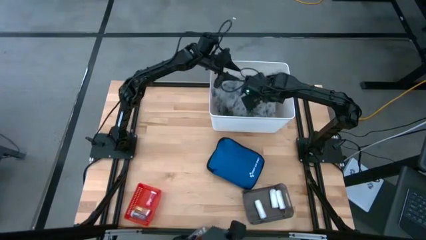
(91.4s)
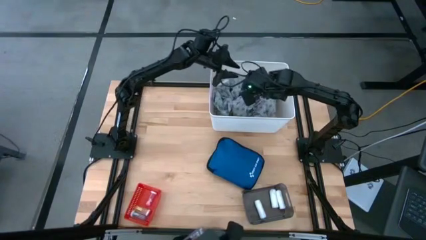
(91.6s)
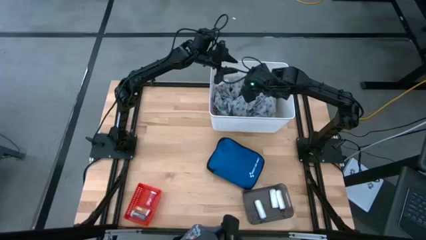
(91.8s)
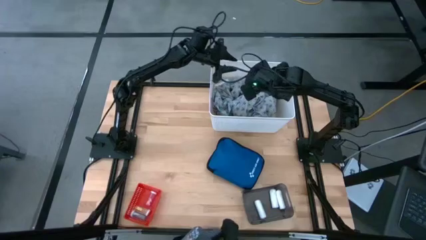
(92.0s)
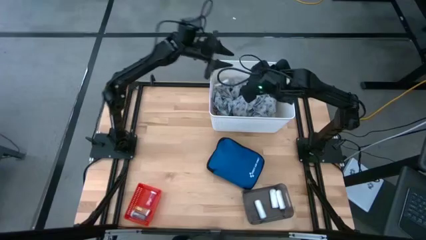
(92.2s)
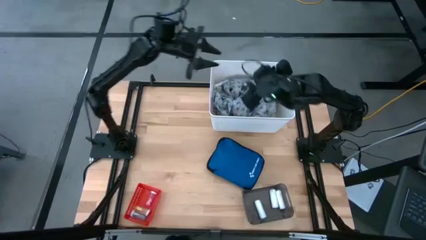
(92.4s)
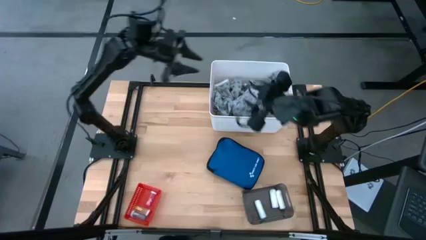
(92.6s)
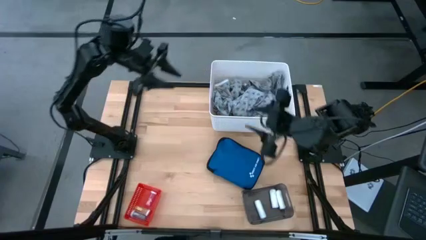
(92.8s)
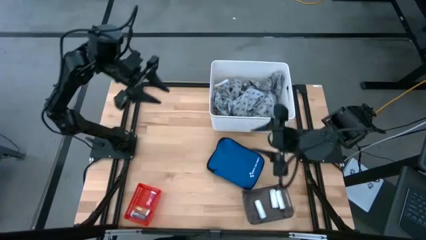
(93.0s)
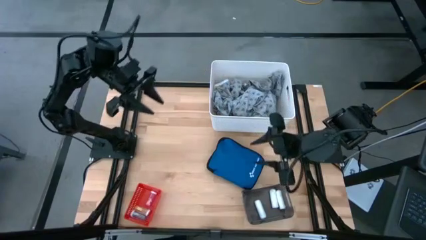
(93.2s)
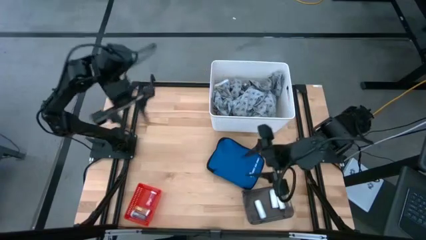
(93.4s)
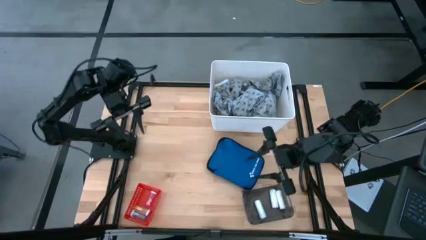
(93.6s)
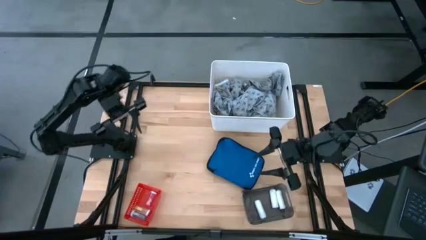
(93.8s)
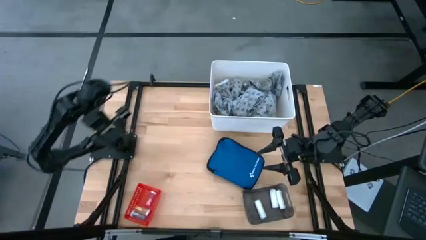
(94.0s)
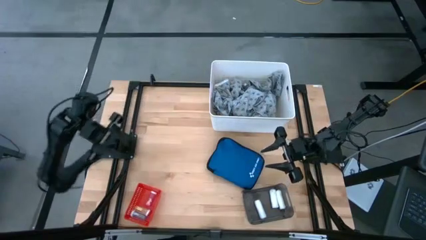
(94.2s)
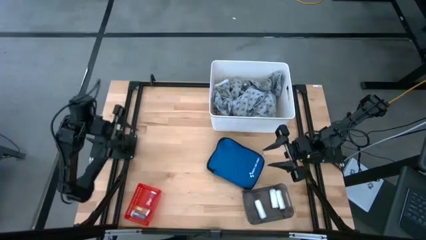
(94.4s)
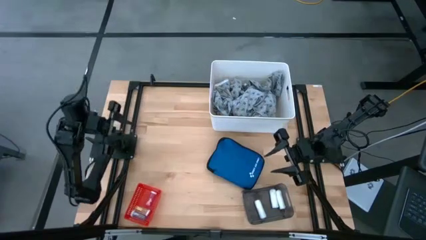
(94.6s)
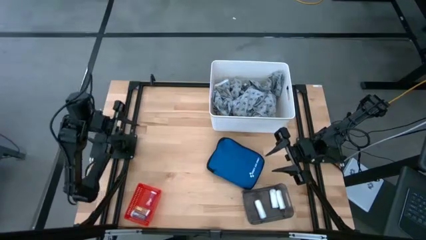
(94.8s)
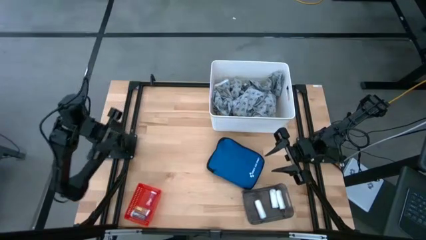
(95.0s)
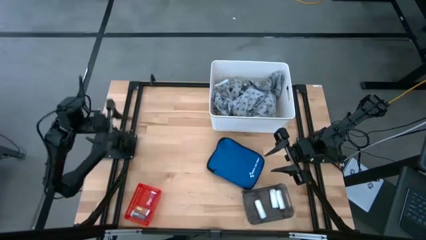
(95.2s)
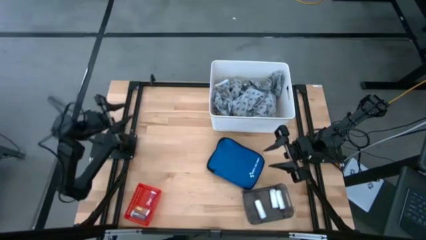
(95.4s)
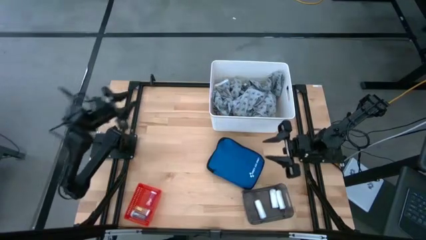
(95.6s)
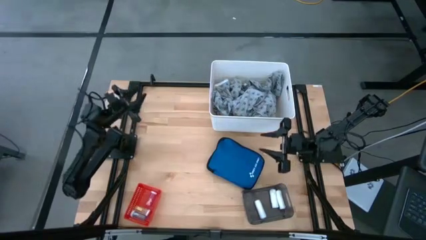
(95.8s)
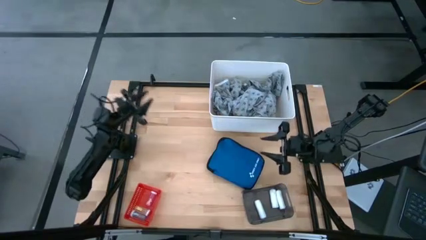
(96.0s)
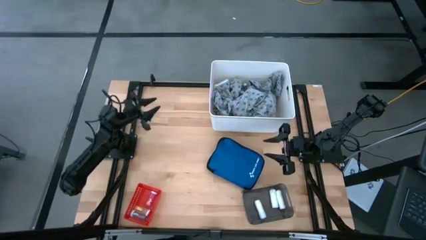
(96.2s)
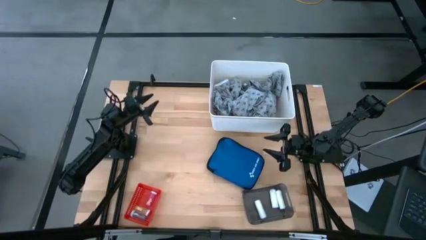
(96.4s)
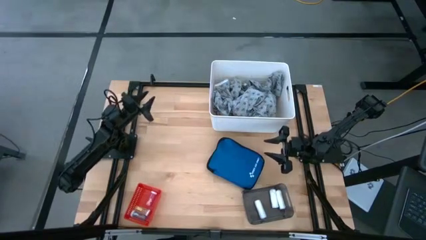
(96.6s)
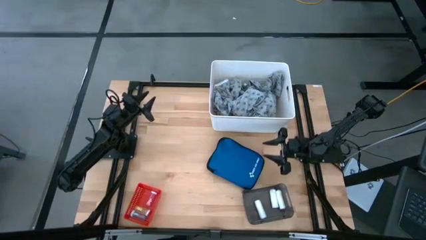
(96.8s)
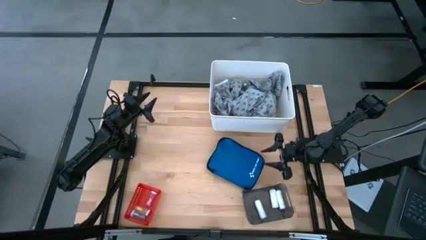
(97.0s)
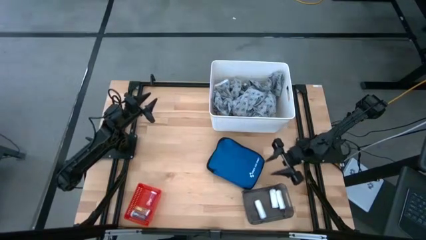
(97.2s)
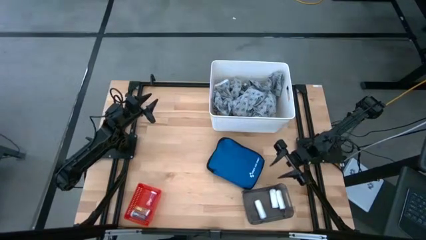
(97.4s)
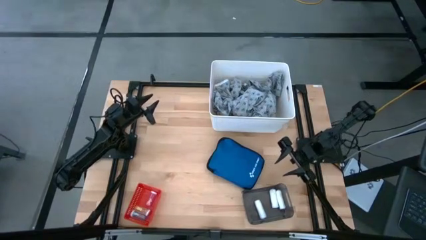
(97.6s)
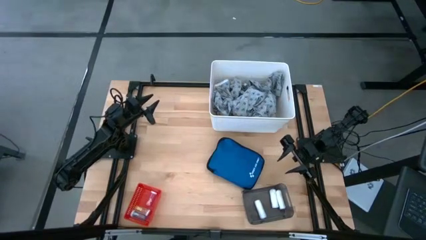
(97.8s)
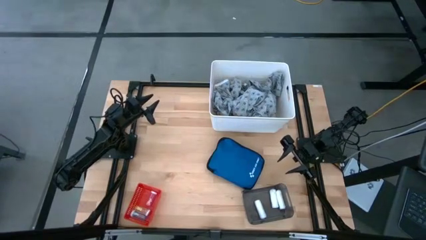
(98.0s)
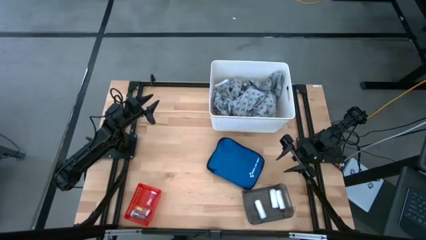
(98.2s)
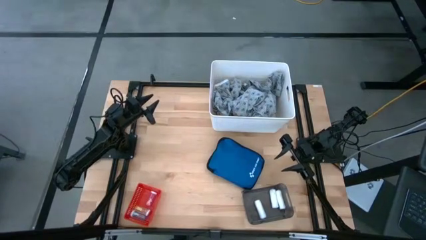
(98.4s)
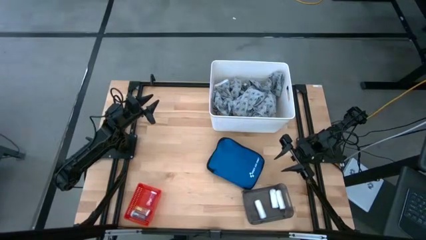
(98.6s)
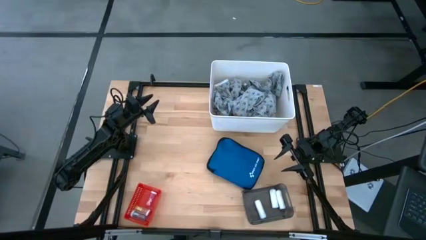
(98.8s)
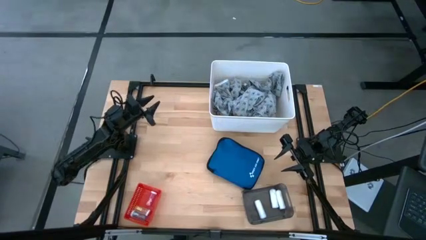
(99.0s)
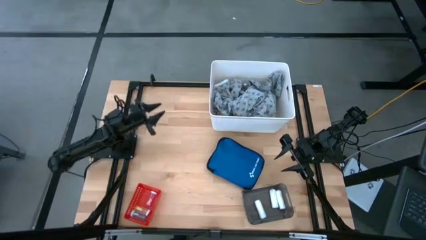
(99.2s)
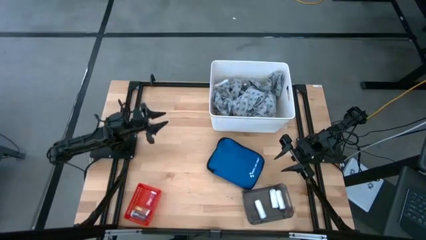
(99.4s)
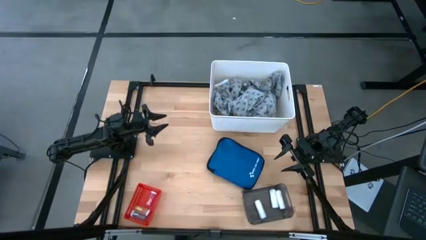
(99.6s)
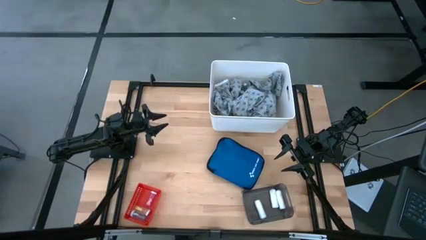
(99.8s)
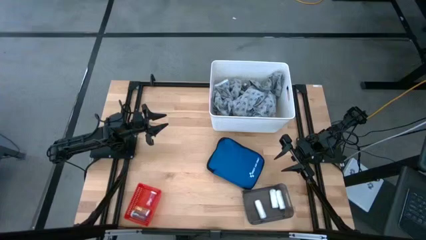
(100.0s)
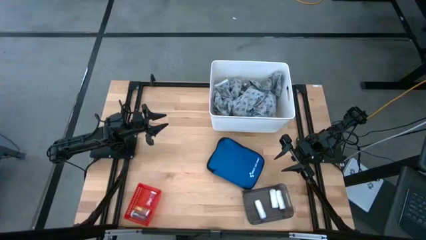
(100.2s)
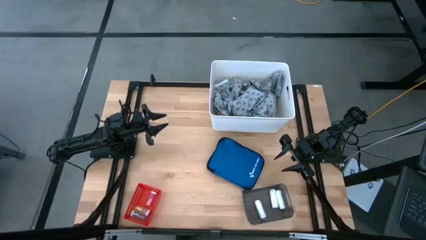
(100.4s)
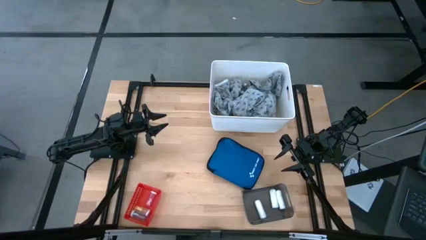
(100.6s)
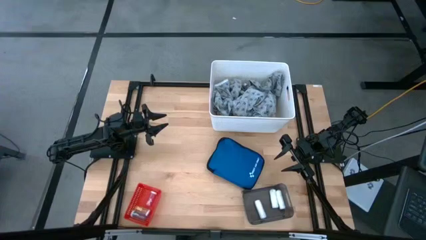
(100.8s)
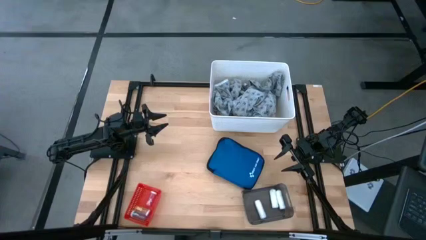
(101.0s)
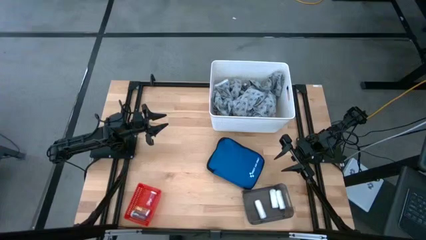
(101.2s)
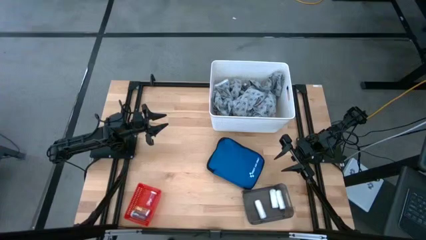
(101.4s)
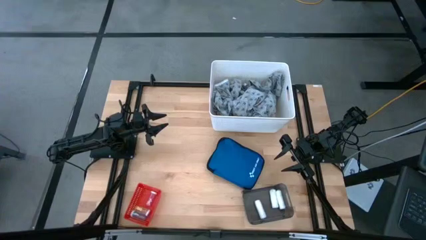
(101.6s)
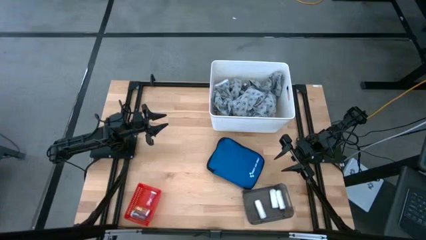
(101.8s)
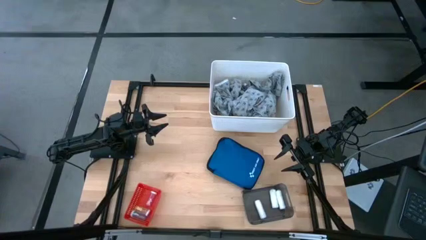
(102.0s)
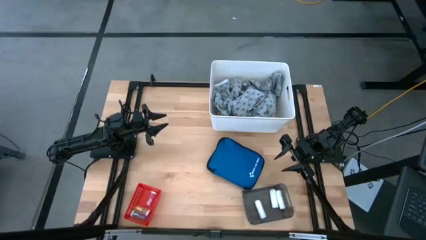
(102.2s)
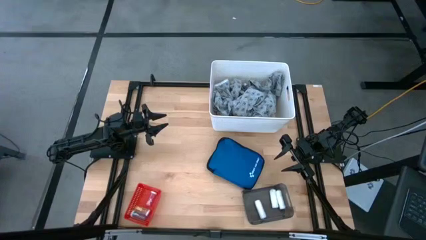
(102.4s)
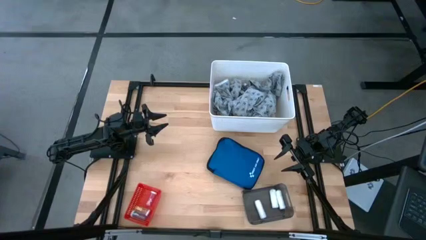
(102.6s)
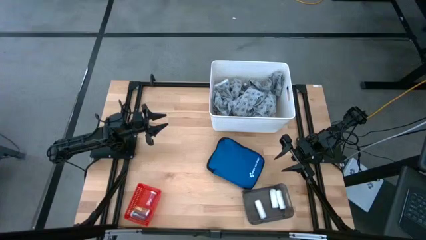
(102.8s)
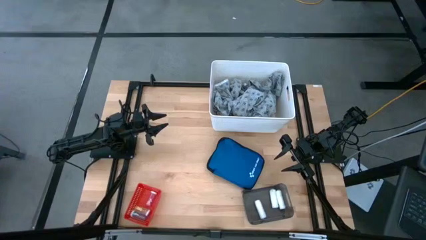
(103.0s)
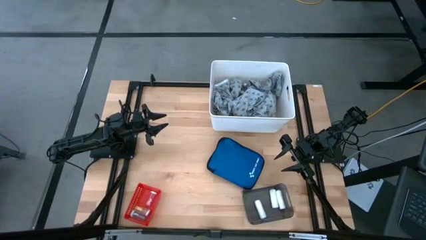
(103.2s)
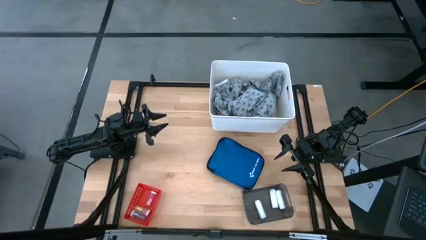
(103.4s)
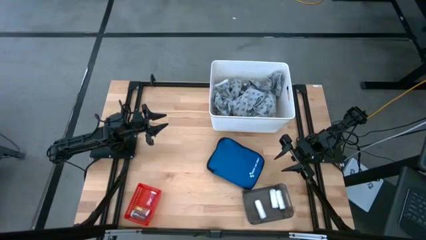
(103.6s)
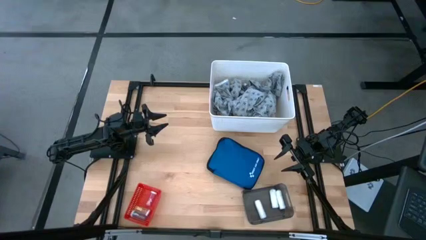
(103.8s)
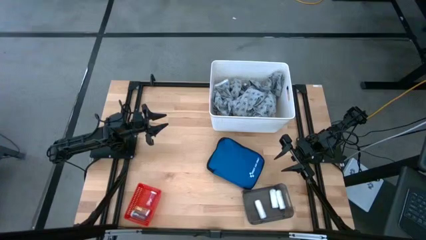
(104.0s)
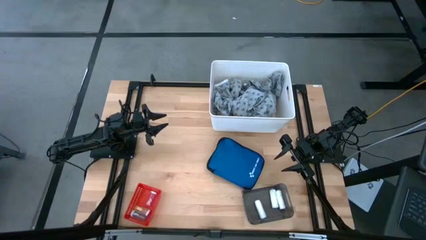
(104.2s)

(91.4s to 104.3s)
Task: Pick & Place Medicine items
Return to Home Position

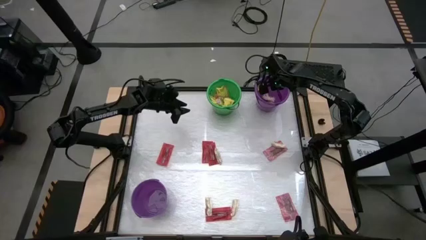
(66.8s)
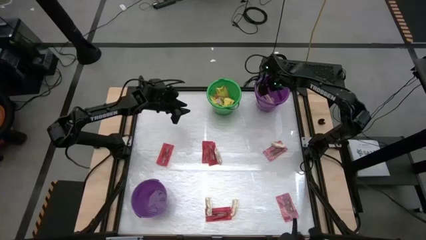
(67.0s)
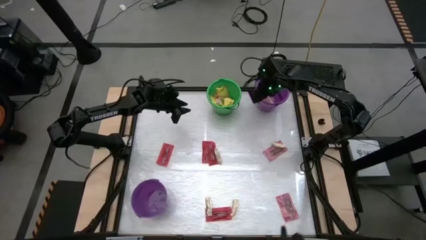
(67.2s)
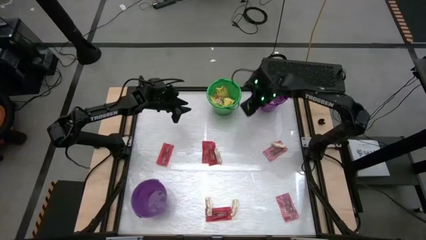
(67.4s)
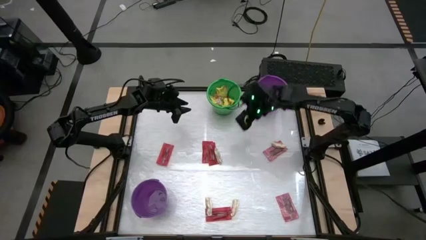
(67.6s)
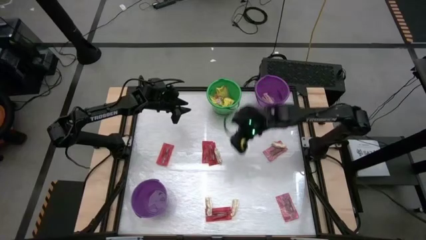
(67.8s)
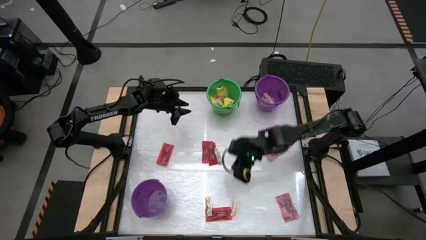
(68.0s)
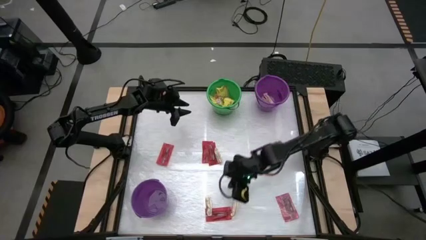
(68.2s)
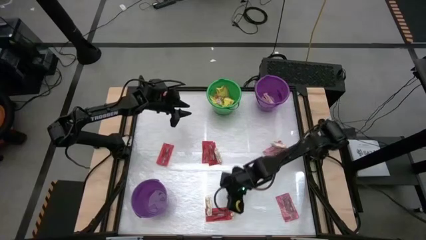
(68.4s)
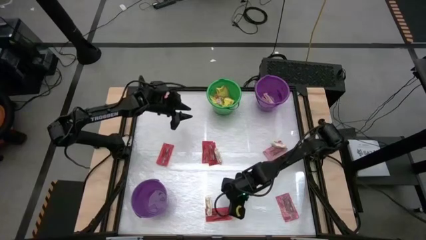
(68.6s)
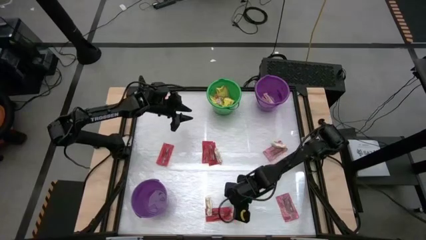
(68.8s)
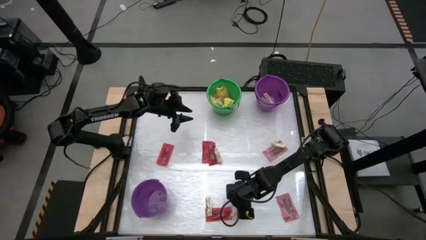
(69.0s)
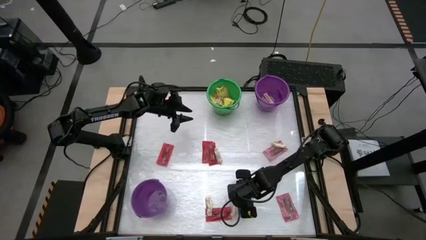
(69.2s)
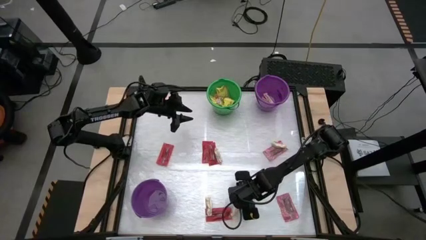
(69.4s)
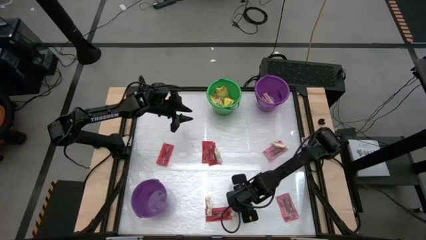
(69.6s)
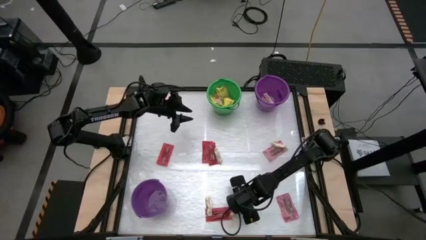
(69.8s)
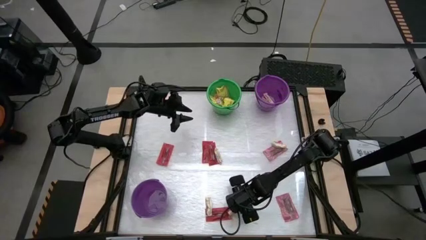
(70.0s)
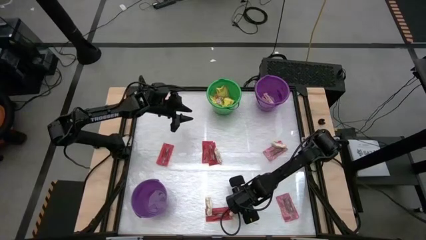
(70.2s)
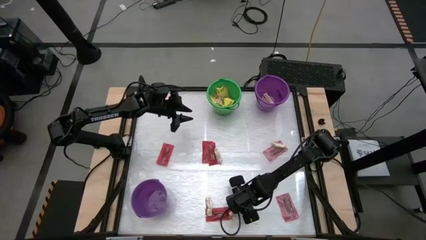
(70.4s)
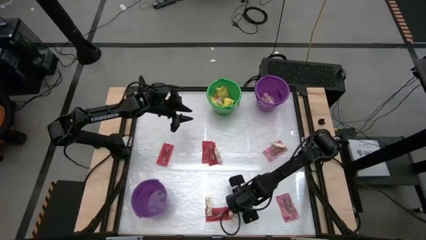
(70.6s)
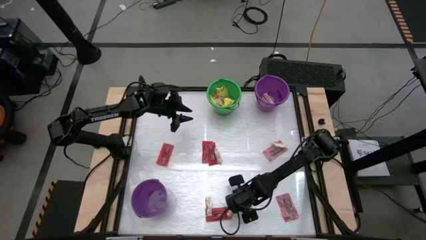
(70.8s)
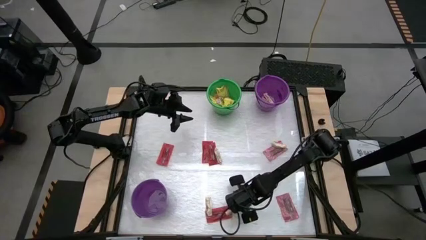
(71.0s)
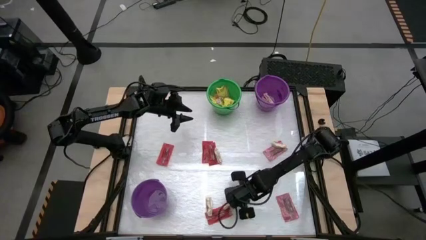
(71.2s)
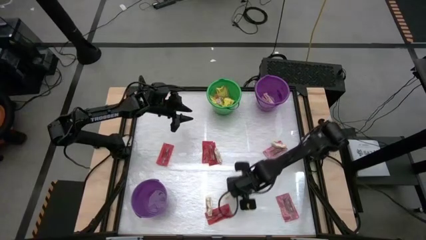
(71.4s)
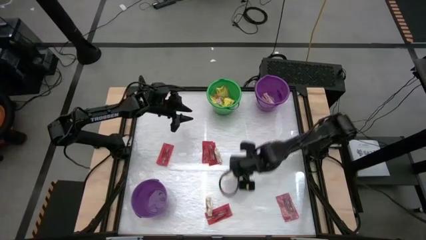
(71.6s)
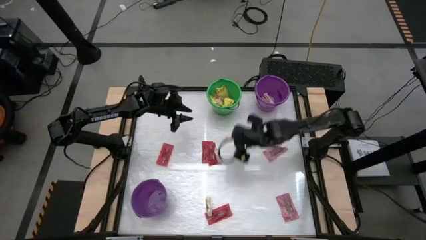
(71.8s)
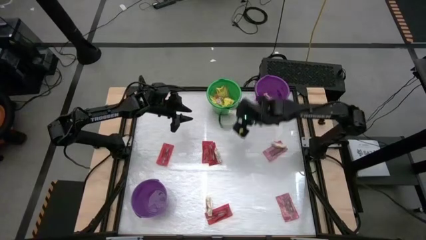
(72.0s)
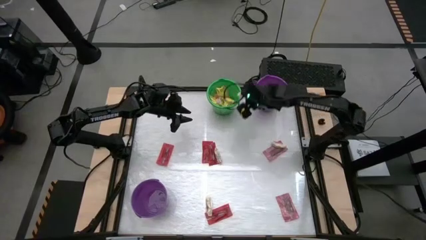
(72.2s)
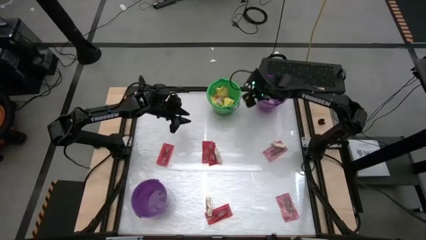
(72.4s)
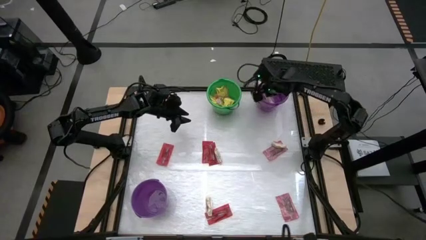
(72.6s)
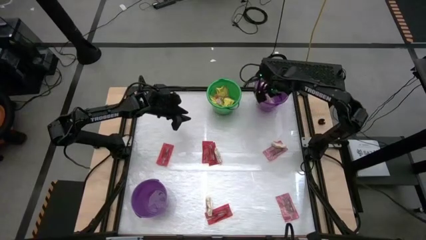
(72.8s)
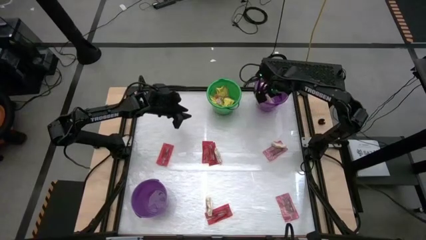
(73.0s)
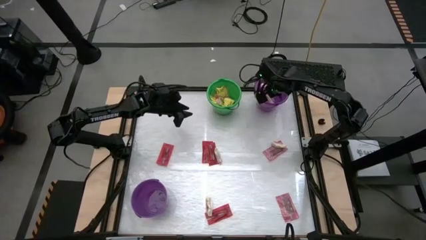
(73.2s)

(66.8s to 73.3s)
Task: Sort candy by brand, put in halloween buckets
Put the light brown chocolate bar into the top violet bucket
